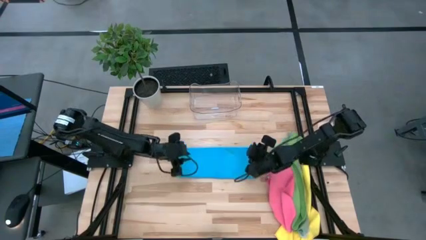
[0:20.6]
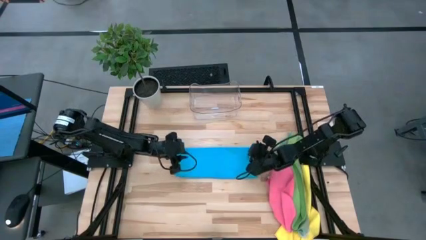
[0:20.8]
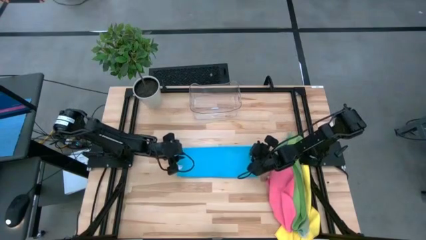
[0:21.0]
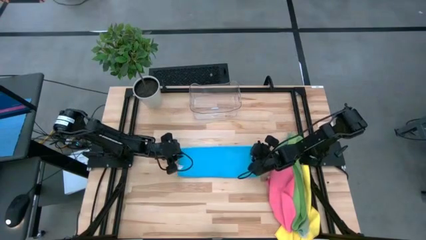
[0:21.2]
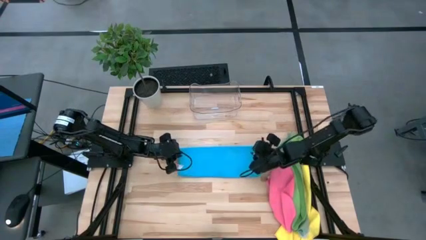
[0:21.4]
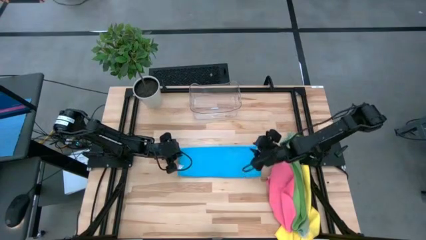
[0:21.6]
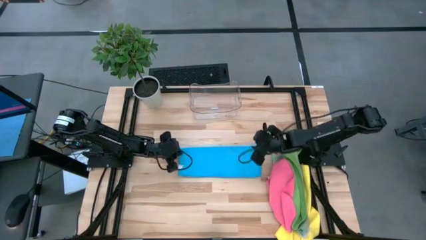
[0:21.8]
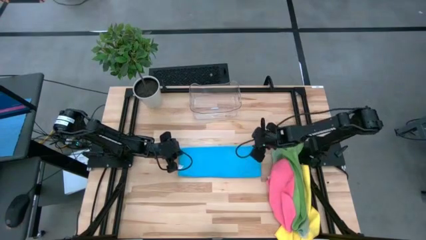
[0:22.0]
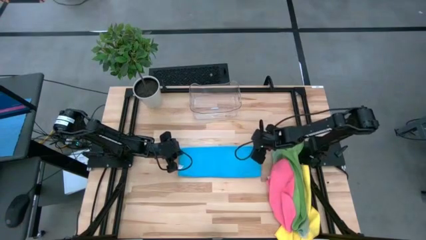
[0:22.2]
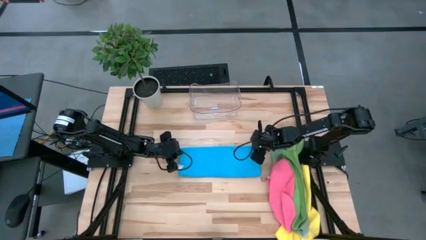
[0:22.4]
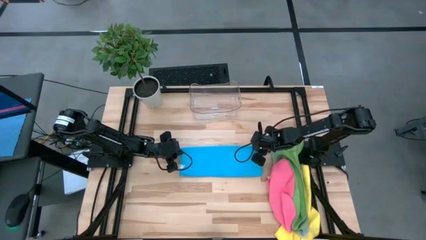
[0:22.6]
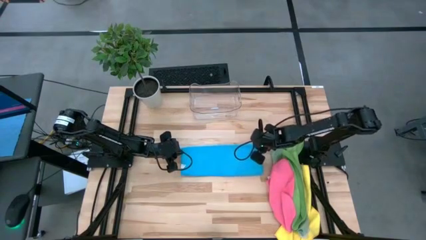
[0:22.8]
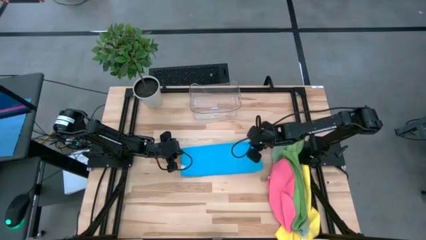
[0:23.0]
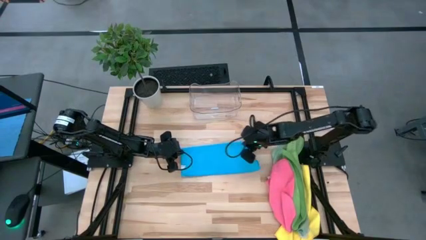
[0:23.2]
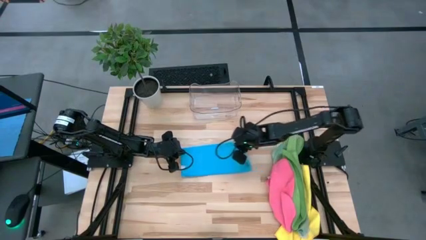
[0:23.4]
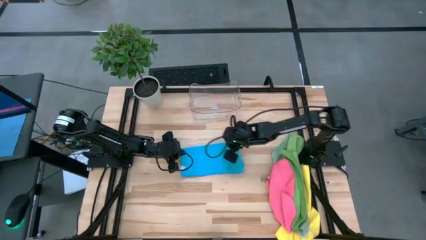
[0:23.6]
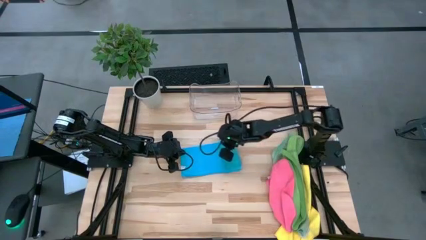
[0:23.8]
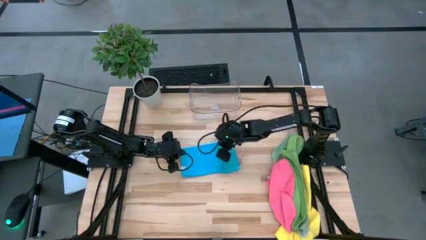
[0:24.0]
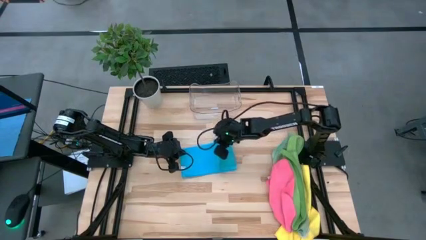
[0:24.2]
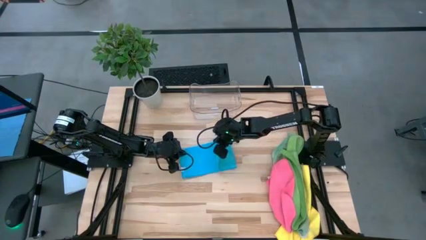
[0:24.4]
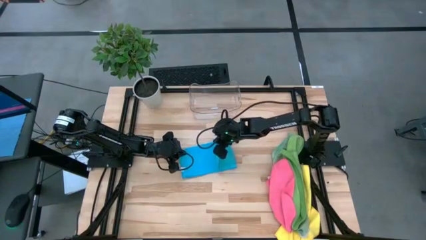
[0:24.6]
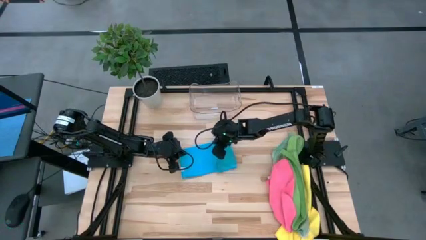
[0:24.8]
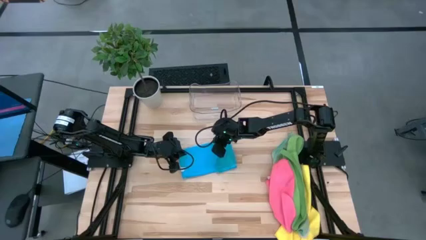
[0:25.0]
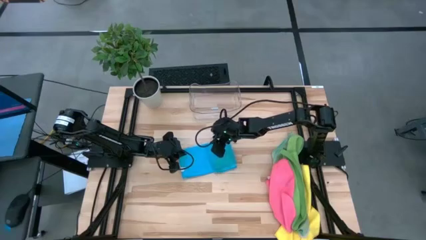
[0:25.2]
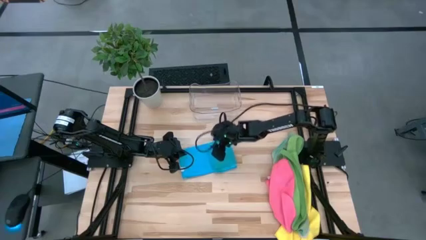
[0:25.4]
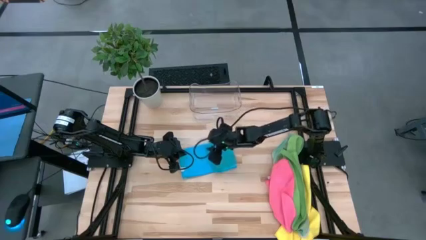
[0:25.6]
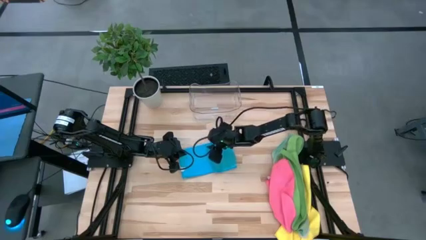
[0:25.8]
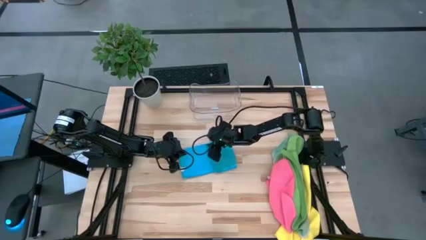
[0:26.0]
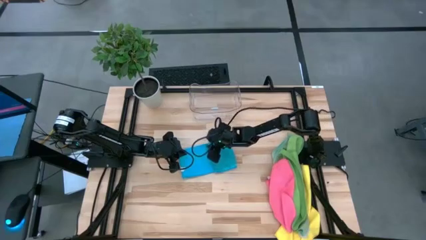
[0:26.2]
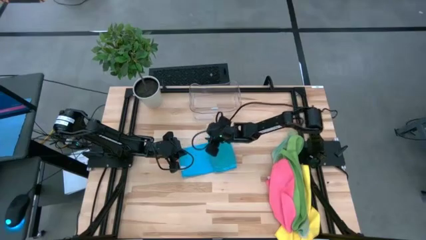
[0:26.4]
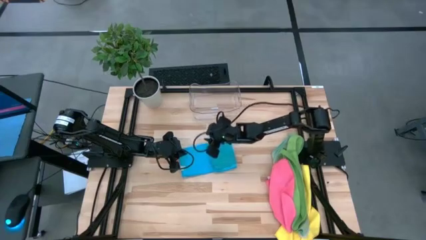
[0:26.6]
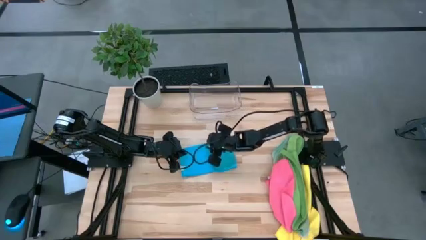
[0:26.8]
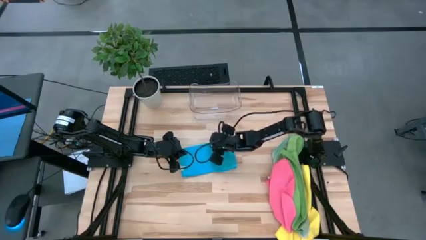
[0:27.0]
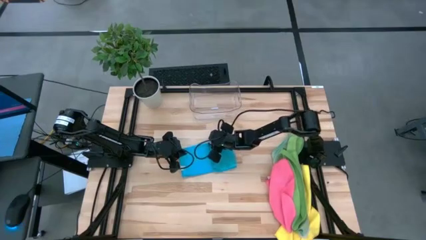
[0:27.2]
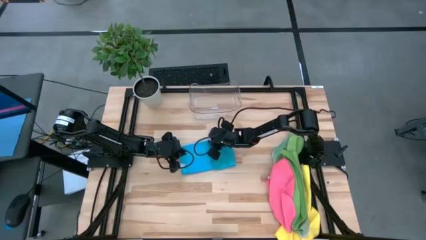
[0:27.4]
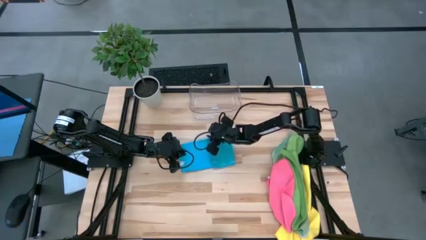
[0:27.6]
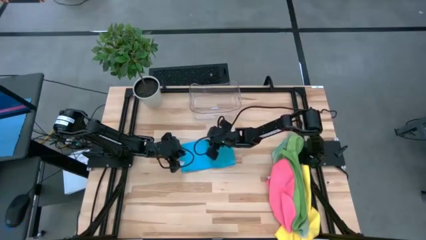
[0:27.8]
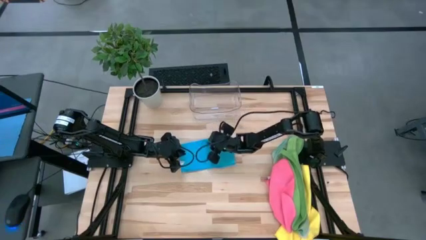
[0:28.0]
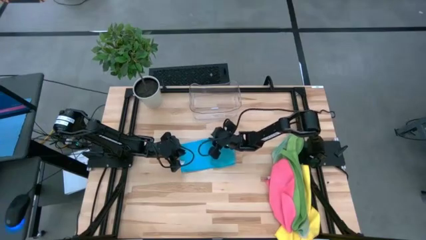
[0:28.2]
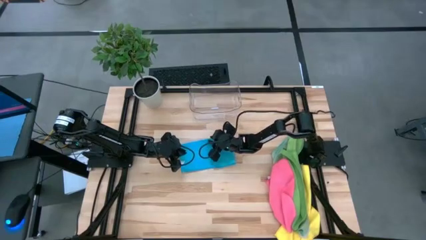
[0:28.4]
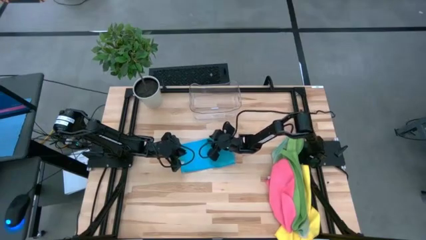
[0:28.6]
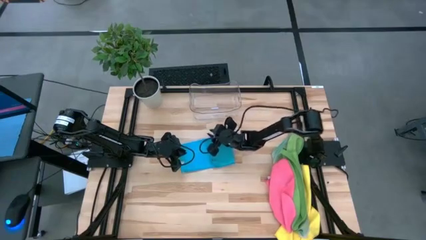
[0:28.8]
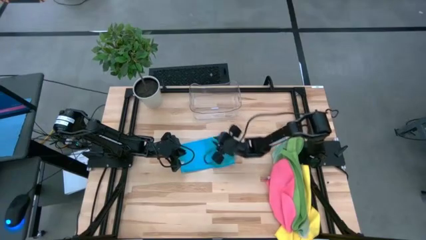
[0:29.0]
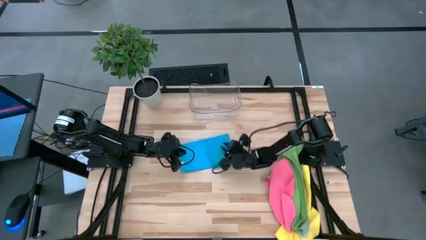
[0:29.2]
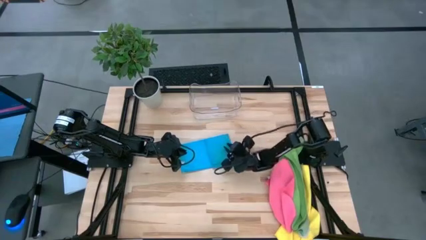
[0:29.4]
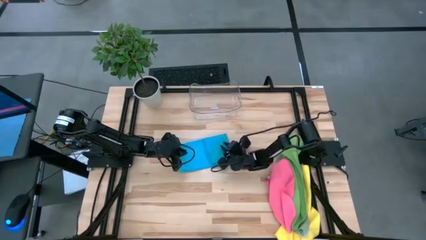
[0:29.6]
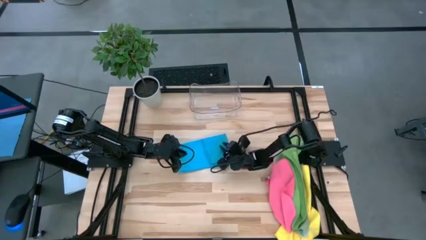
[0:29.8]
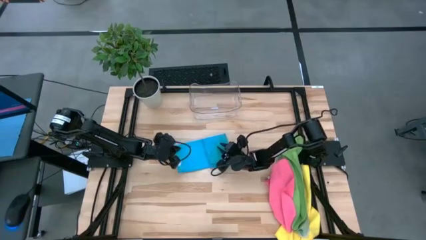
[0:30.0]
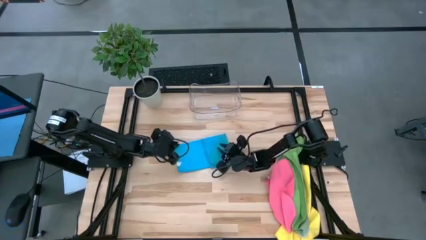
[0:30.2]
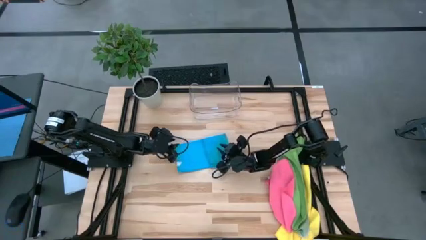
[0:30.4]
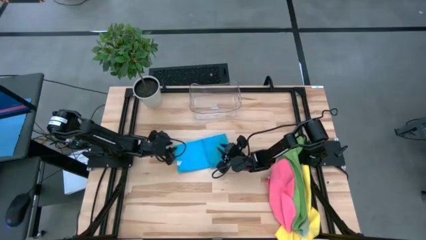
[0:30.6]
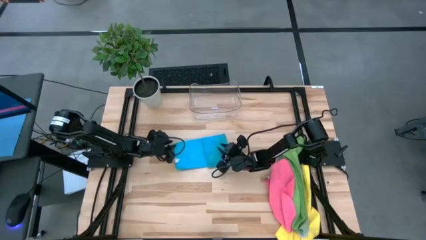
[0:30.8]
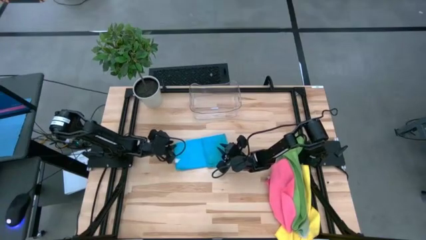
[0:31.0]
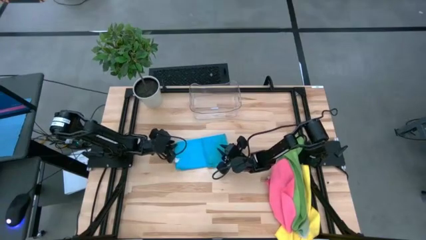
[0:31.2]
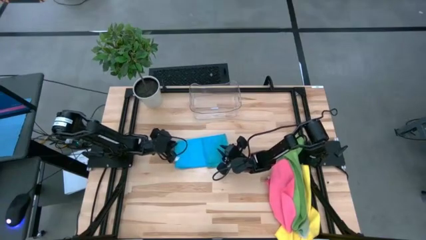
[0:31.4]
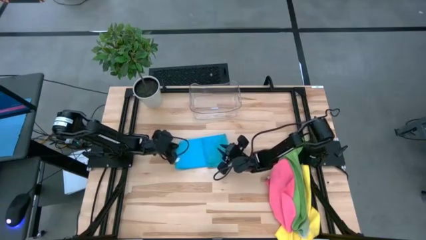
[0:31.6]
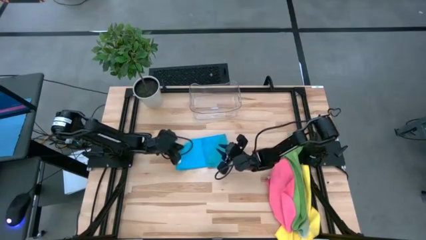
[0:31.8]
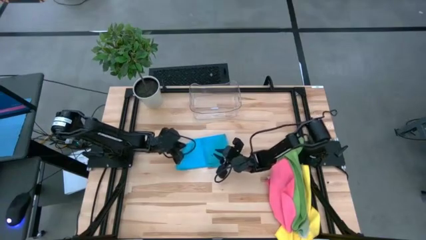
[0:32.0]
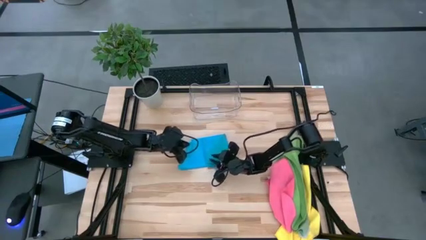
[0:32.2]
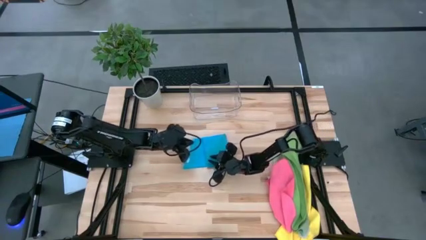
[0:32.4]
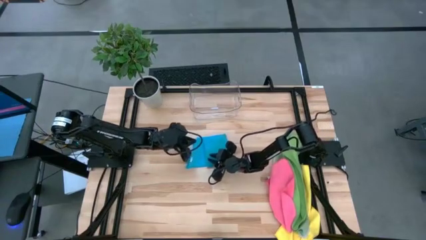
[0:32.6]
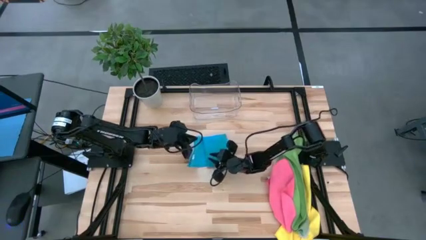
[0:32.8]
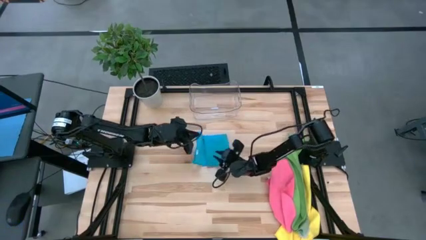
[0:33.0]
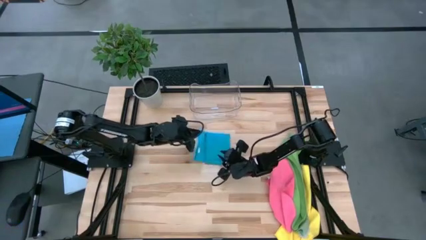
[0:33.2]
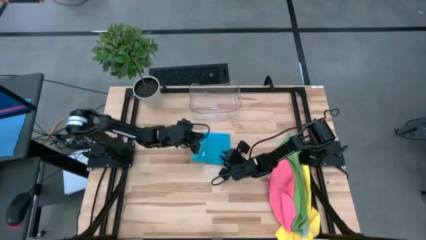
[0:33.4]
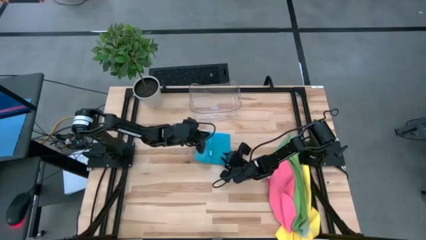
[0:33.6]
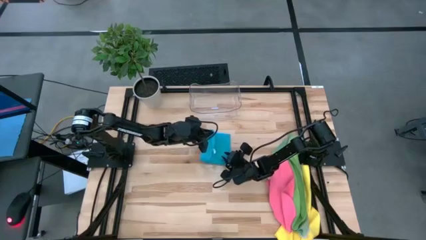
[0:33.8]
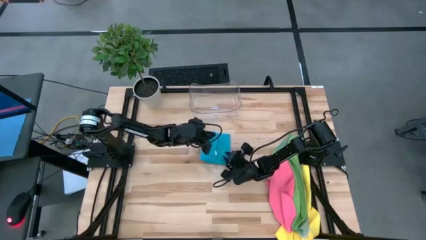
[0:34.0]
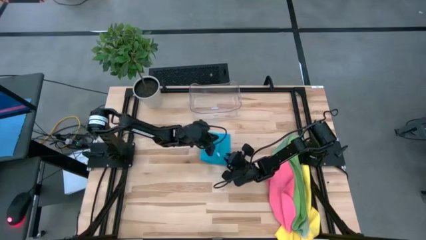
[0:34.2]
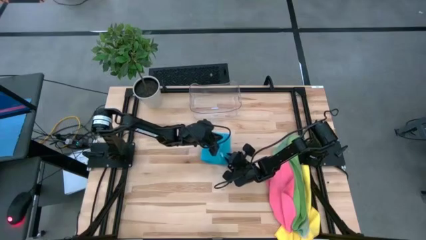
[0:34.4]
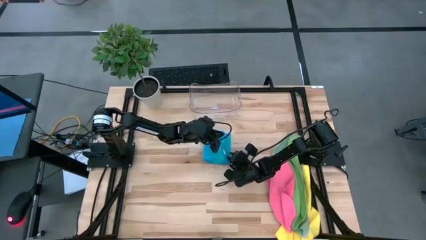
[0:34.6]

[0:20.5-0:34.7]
Task: Fold microfiber towels
Fold the blue microfiber towel
